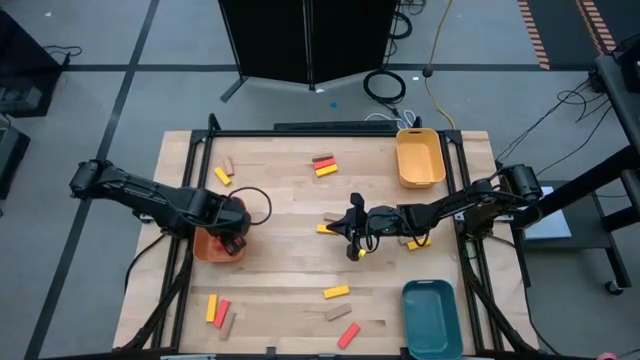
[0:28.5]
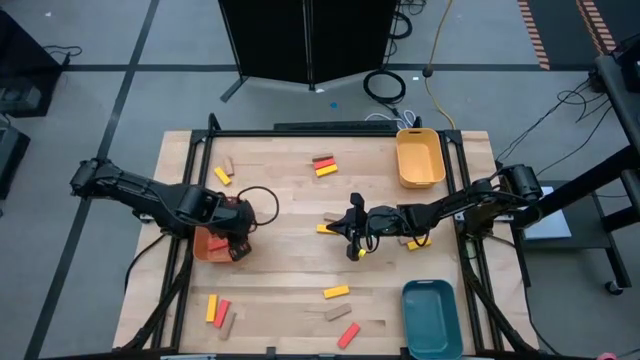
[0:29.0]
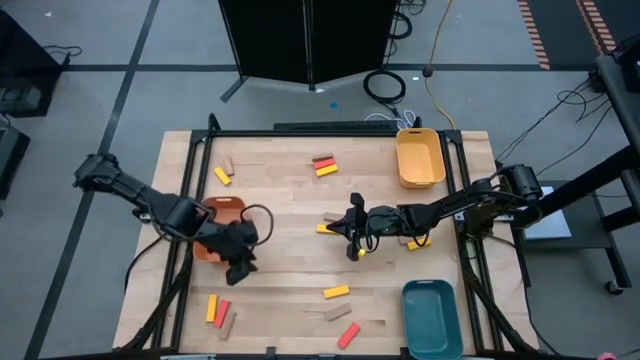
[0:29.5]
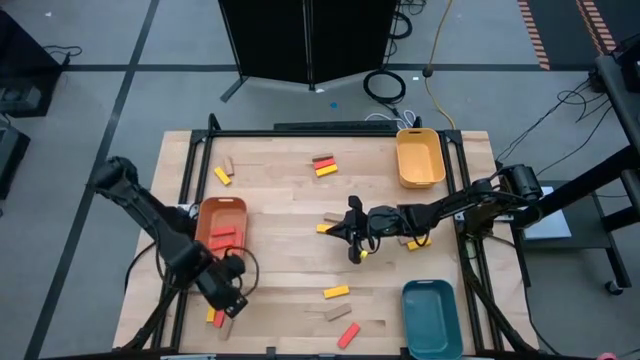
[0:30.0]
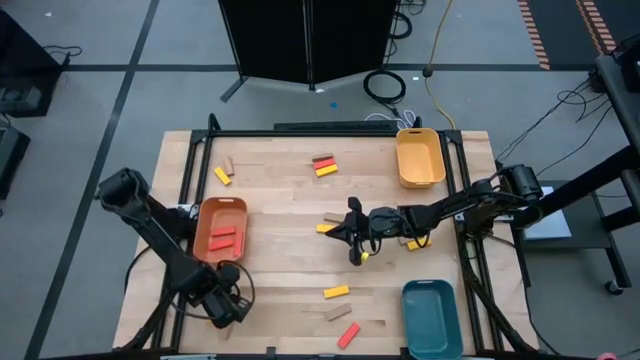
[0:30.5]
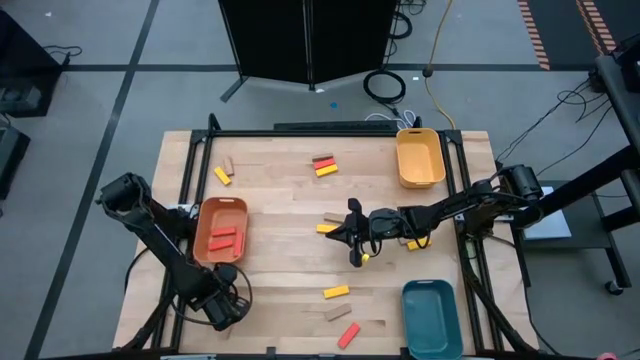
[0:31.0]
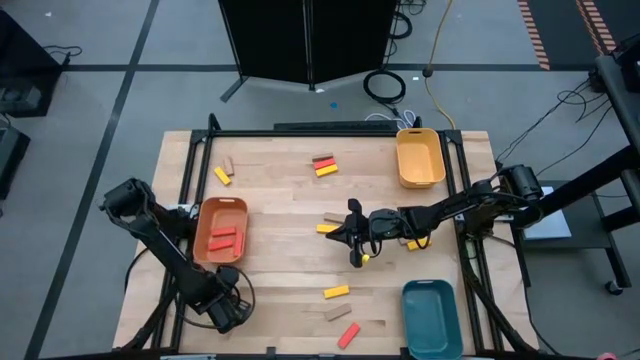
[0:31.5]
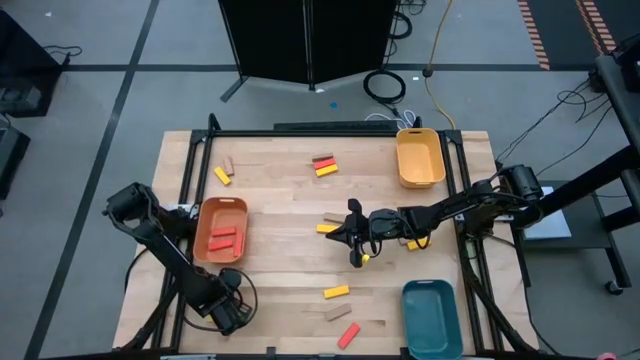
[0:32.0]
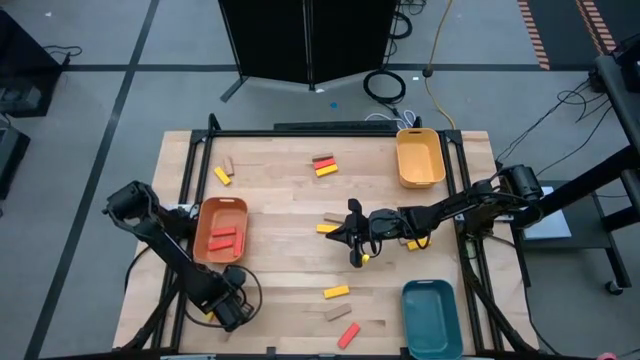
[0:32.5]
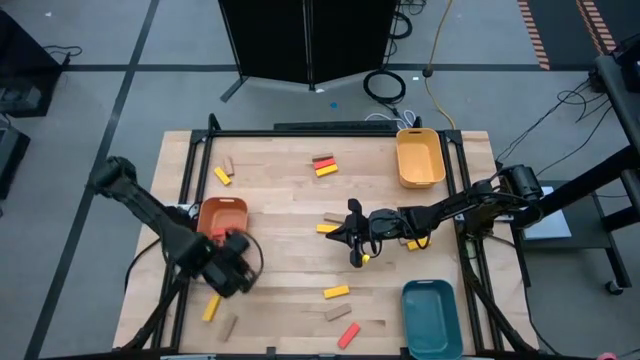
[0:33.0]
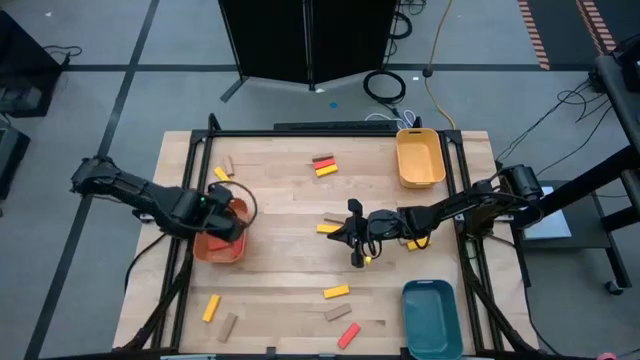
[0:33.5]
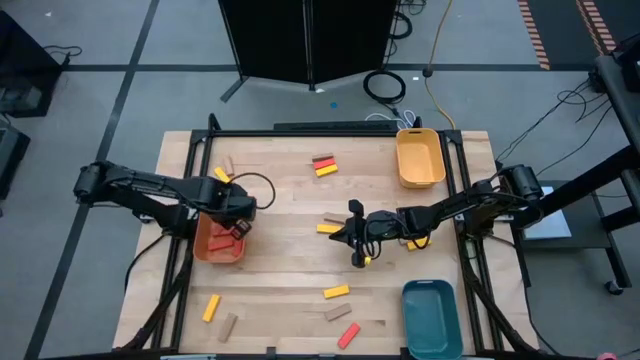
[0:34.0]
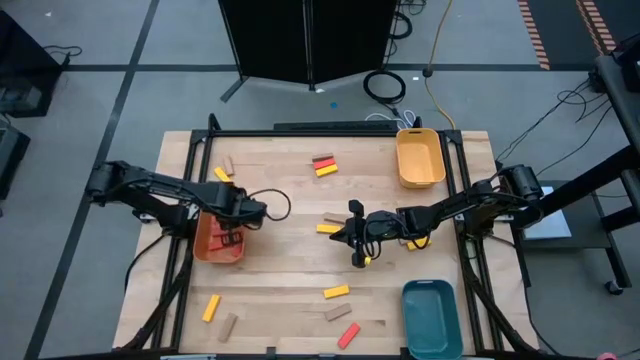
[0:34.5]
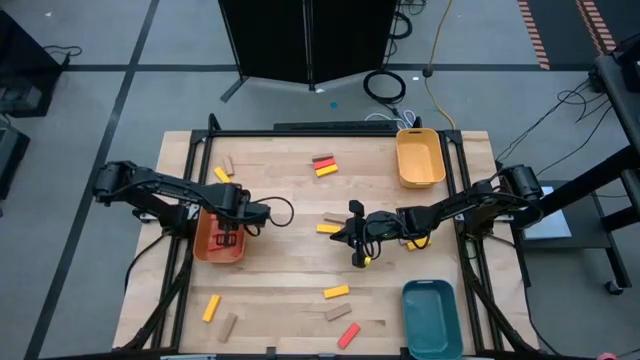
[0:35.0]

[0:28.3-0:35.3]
Task: Sort blocks
Put the orange block into the orange bin

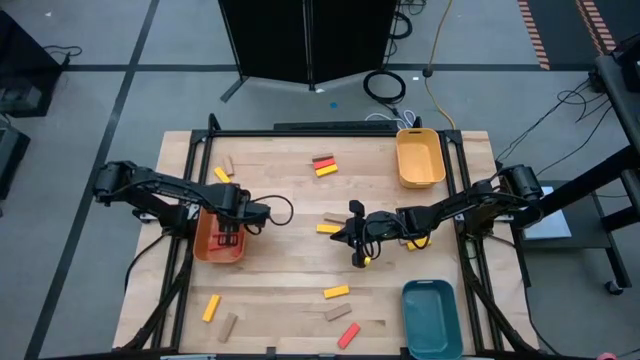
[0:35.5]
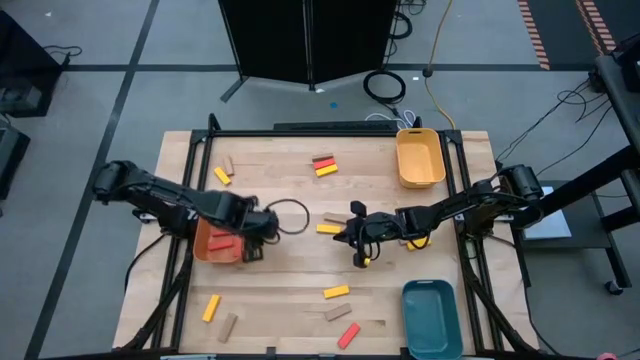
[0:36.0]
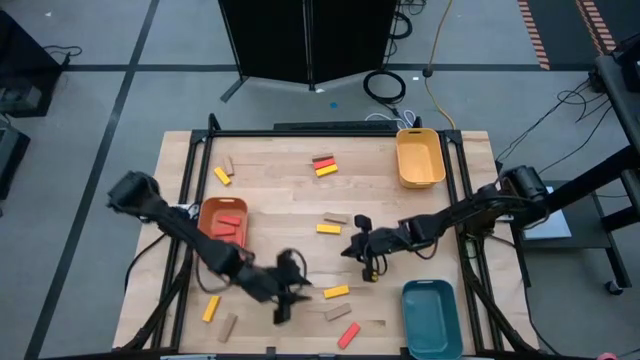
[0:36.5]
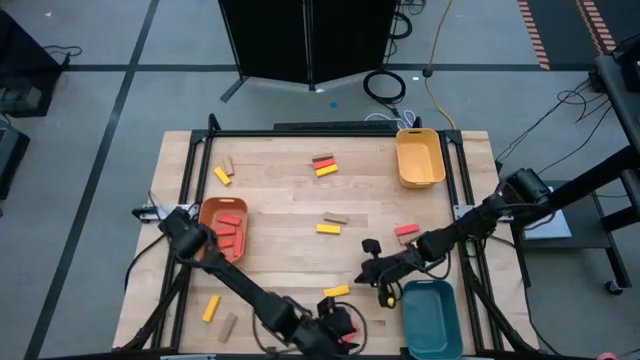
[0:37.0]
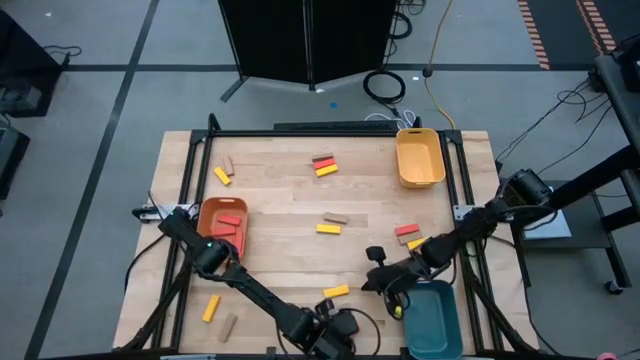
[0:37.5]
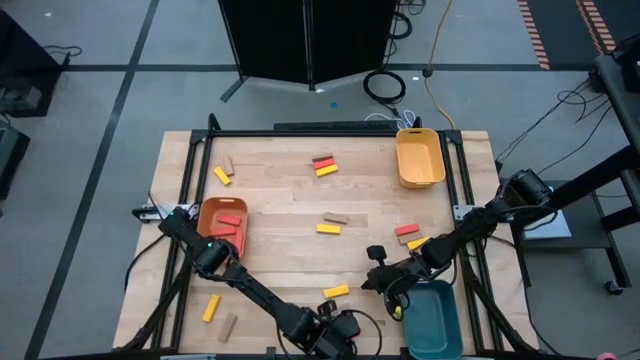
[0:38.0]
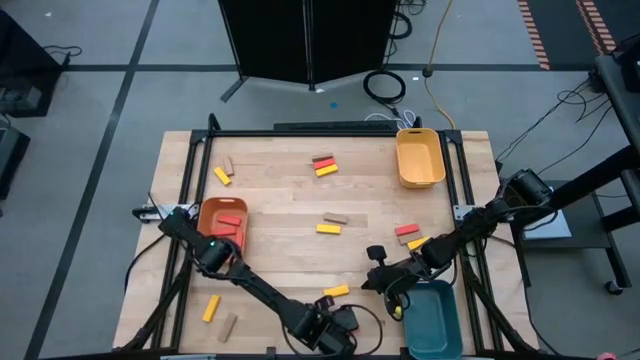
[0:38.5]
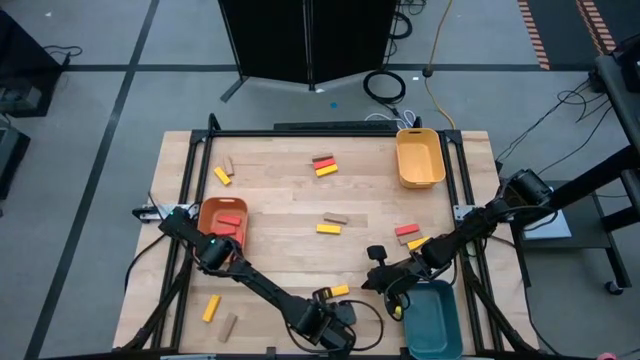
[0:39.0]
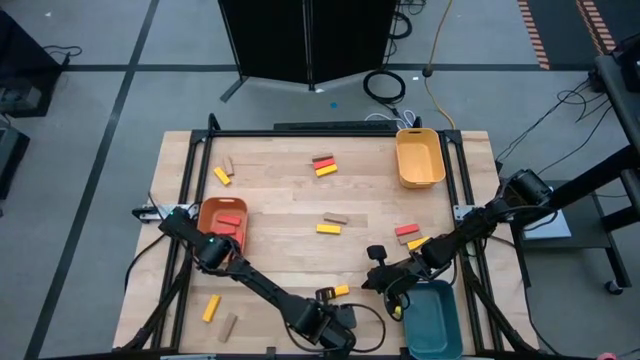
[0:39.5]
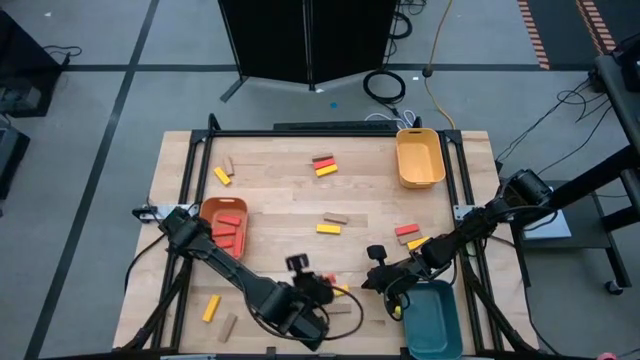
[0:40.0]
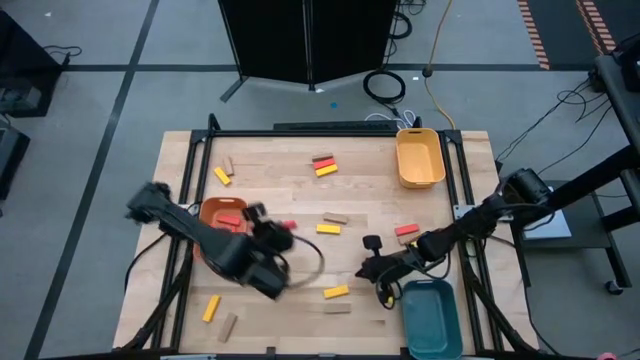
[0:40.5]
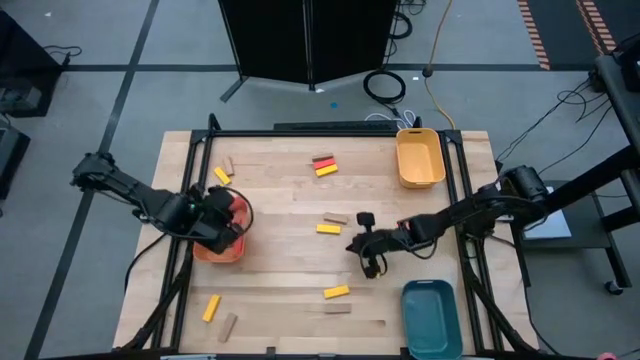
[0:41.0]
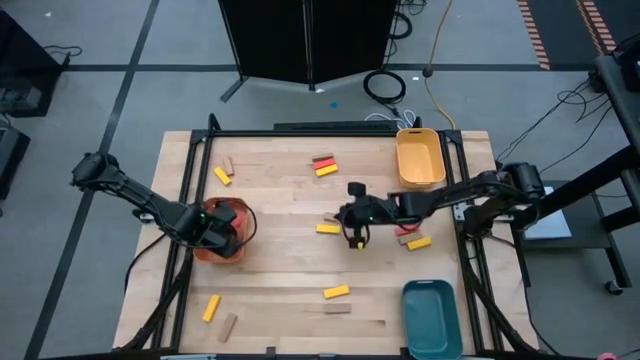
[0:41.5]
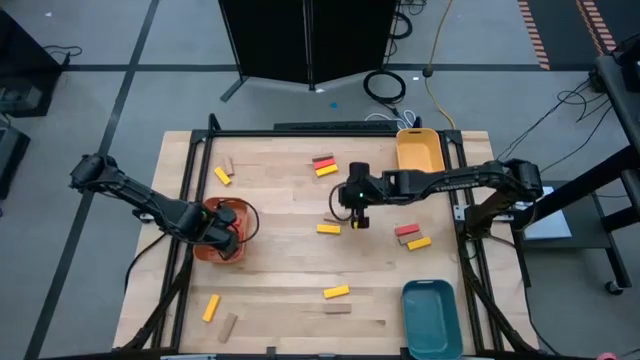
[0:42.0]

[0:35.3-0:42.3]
Put the orange block into the orange bin

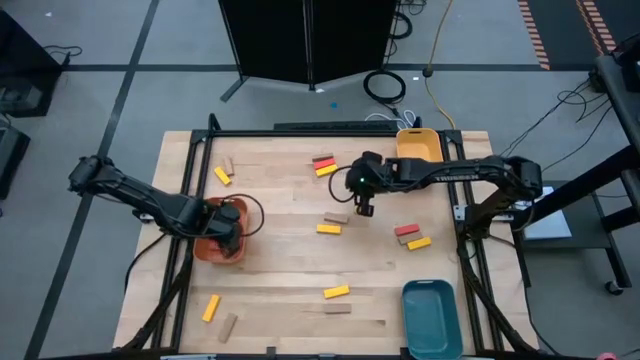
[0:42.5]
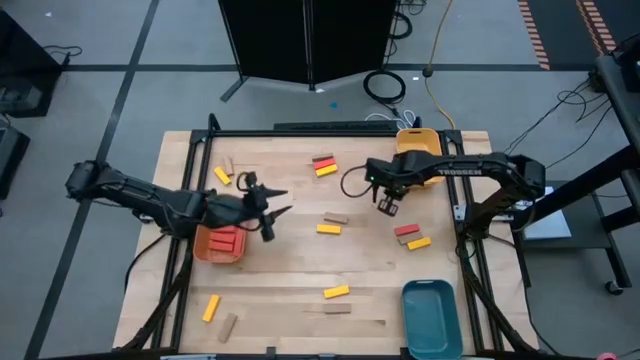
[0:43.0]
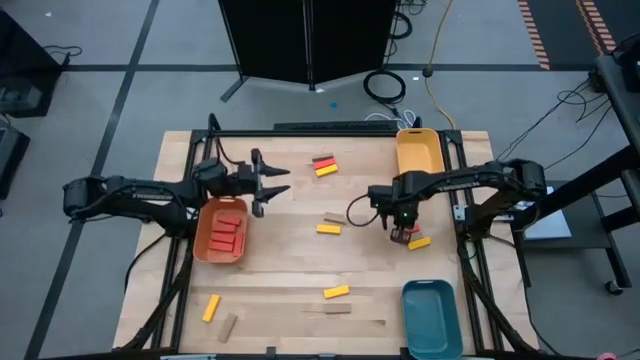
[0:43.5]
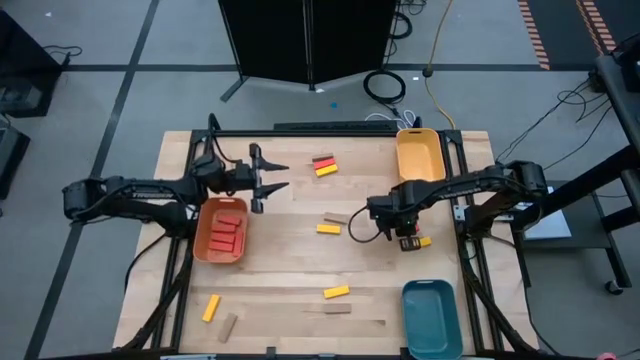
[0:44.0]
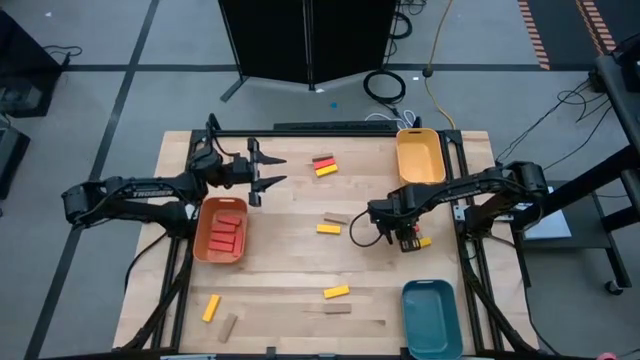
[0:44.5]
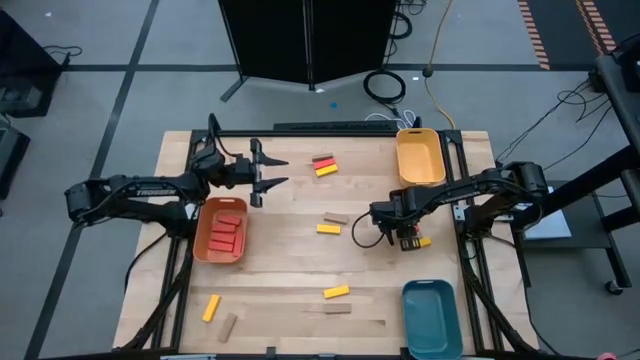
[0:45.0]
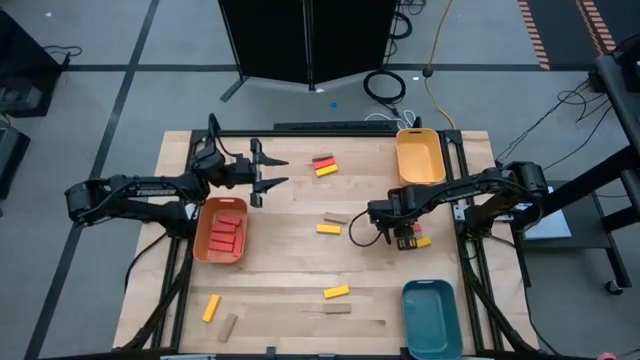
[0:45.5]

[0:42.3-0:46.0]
Put the orange block into the orange bin

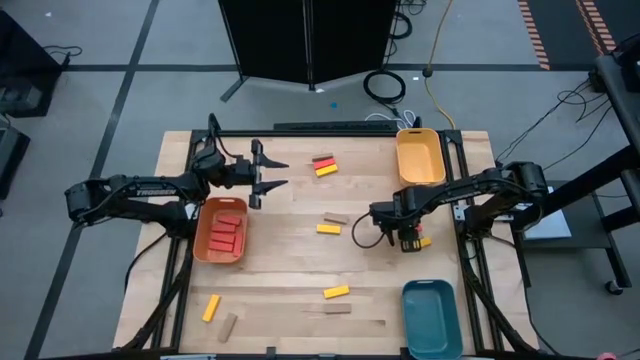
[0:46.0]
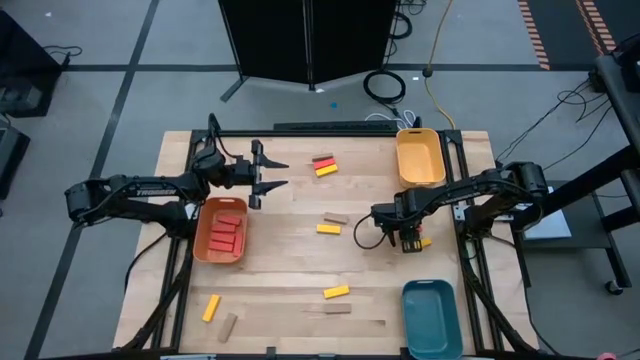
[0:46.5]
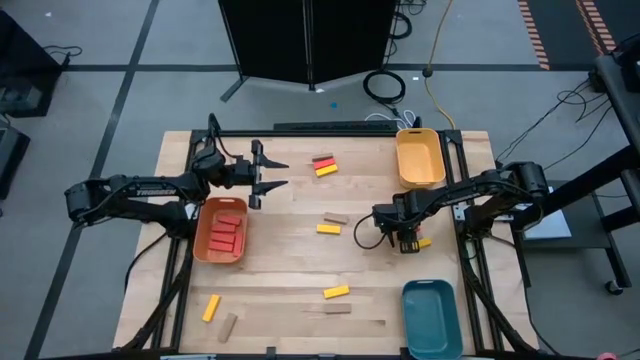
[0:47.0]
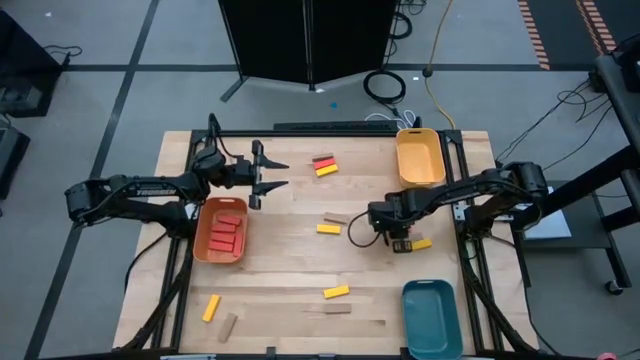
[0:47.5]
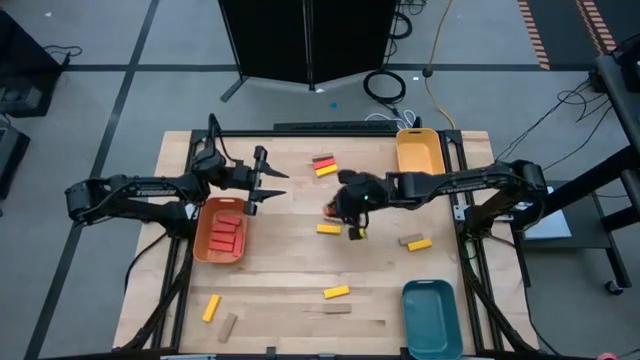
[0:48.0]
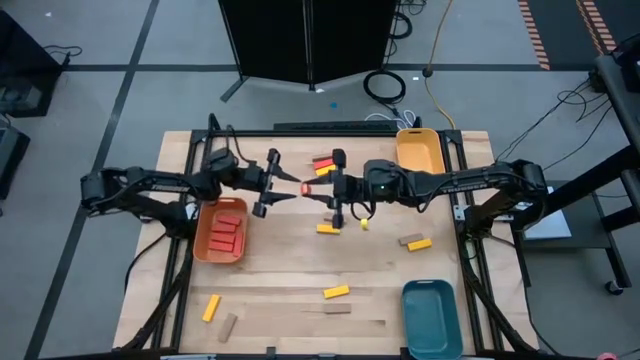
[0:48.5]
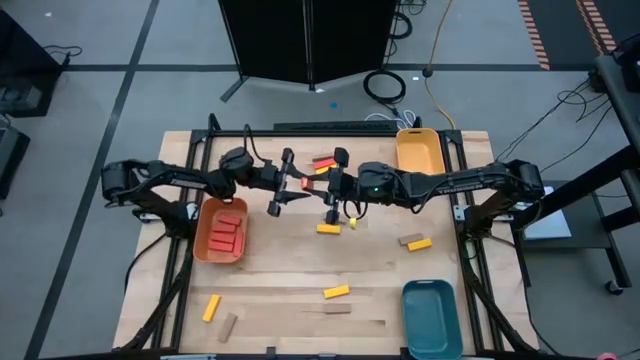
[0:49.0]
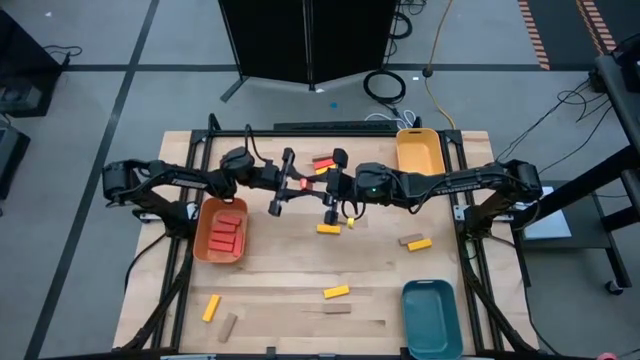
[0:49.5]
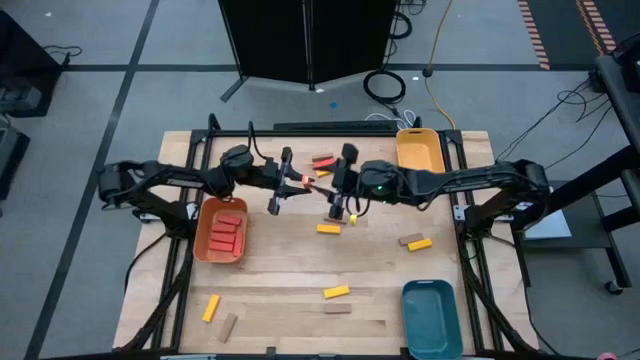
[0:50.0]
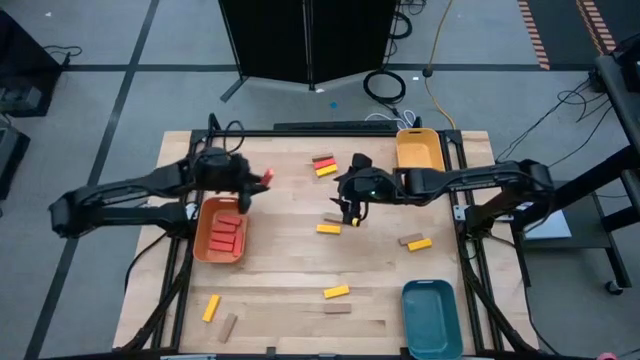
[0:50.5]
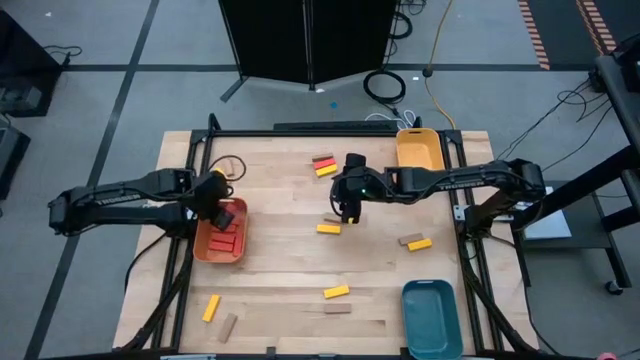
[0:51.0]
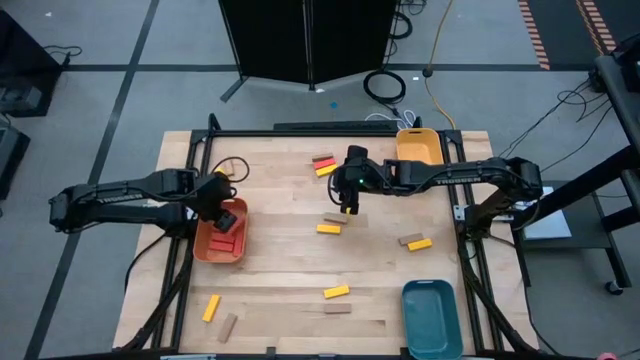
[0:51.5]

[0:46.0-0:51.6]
Put the orange block into the orange bin
